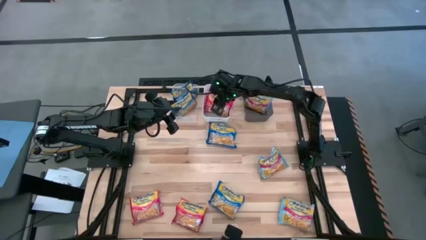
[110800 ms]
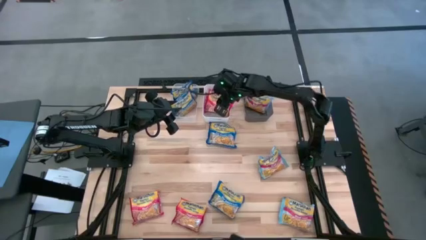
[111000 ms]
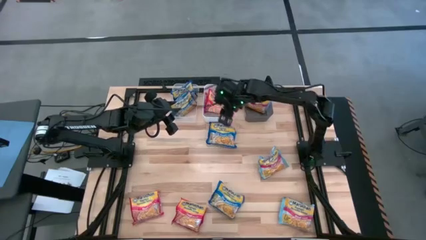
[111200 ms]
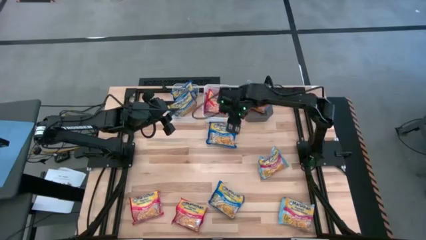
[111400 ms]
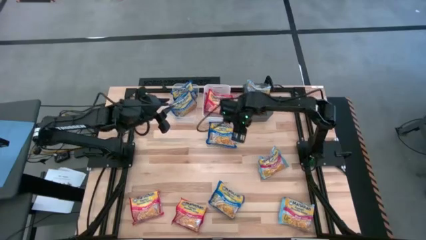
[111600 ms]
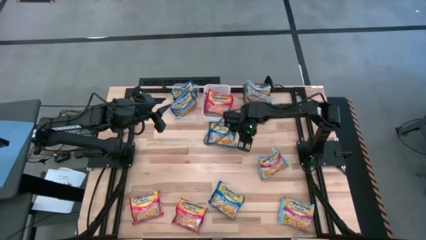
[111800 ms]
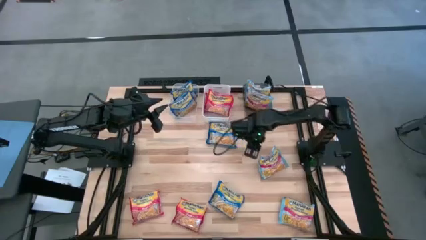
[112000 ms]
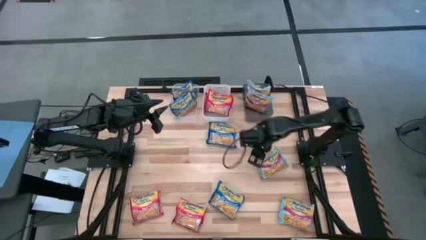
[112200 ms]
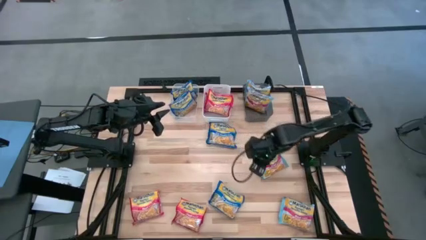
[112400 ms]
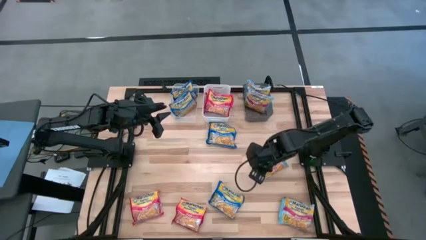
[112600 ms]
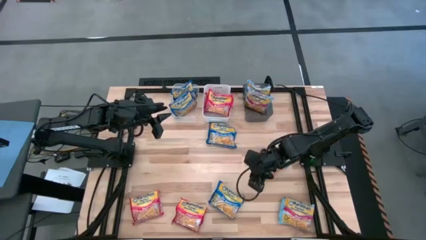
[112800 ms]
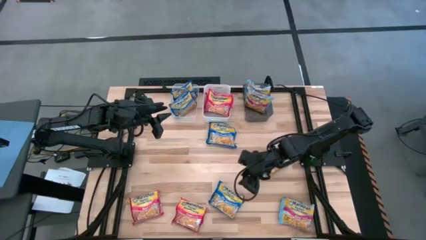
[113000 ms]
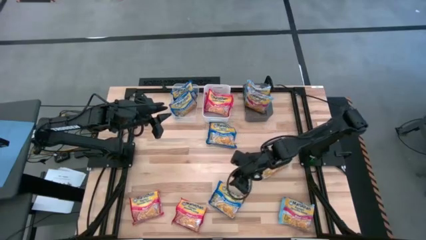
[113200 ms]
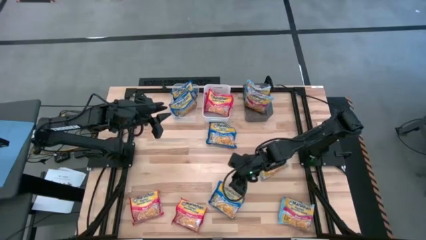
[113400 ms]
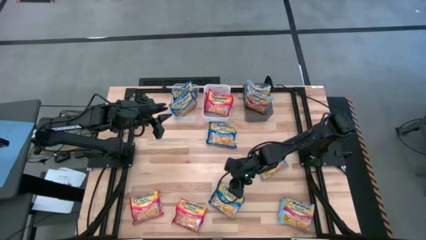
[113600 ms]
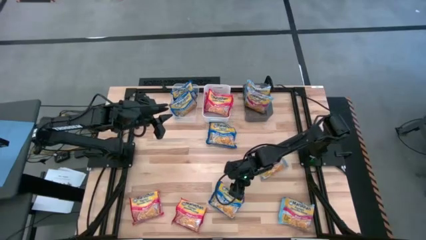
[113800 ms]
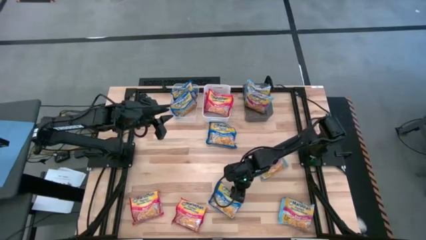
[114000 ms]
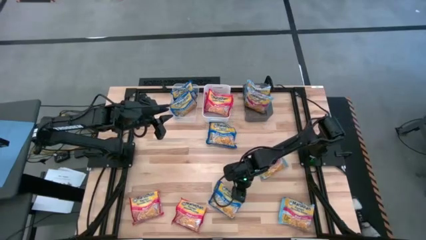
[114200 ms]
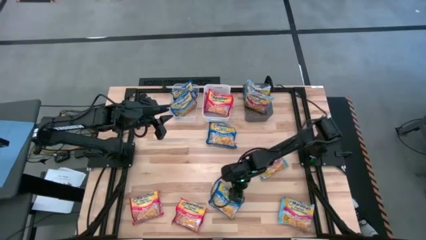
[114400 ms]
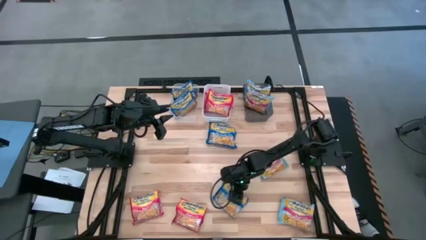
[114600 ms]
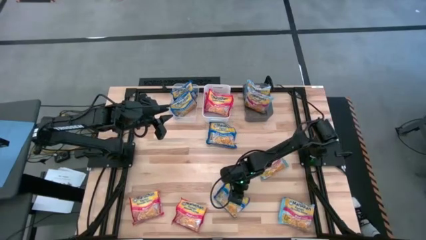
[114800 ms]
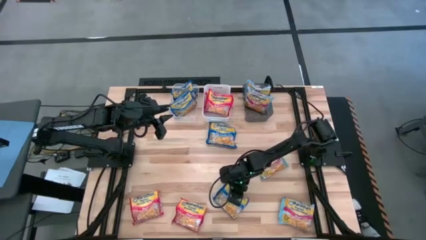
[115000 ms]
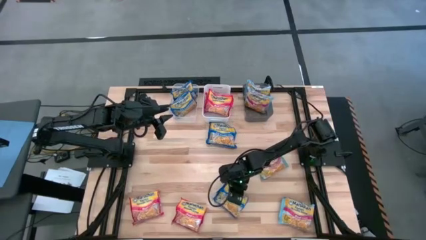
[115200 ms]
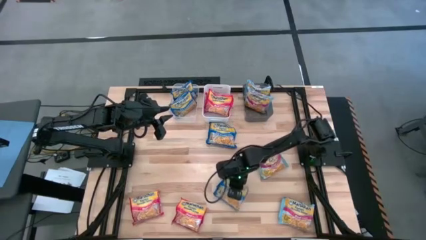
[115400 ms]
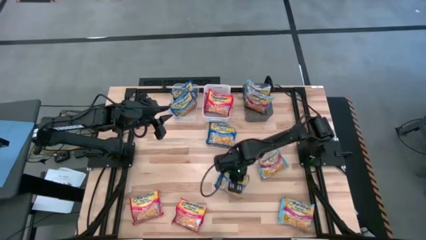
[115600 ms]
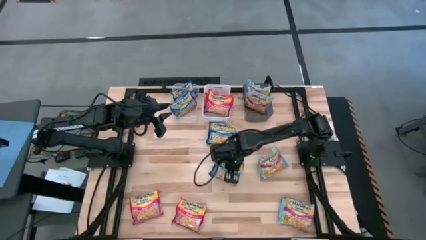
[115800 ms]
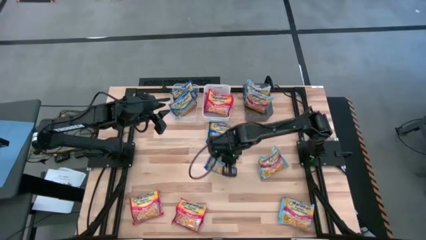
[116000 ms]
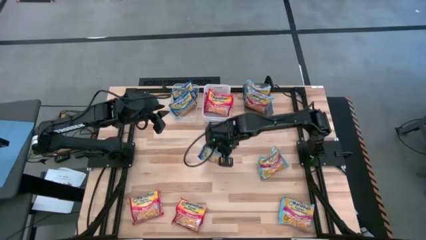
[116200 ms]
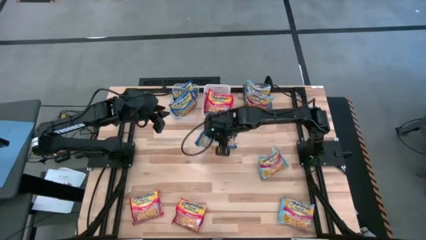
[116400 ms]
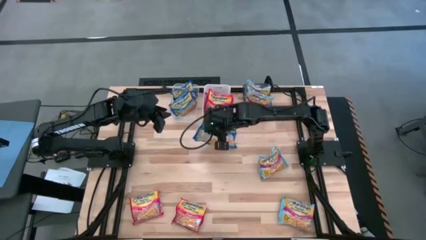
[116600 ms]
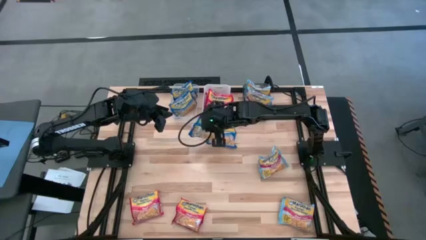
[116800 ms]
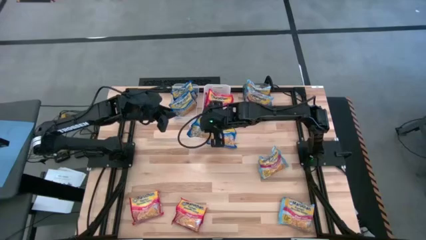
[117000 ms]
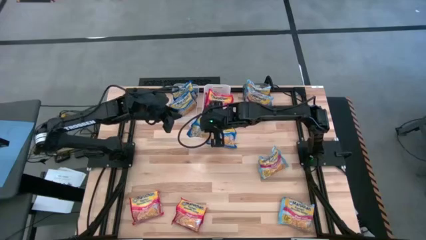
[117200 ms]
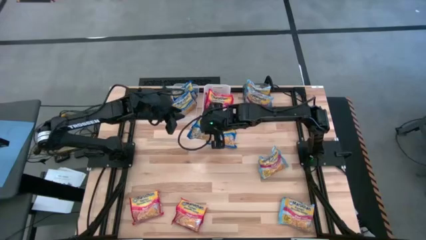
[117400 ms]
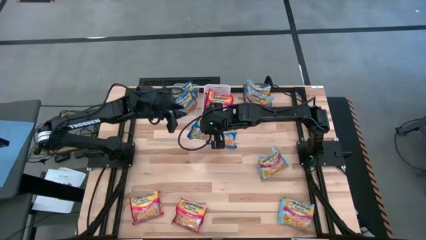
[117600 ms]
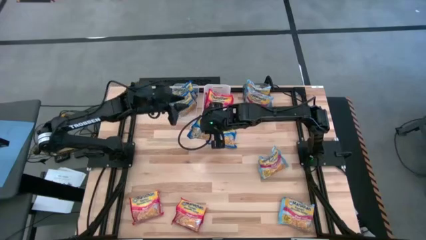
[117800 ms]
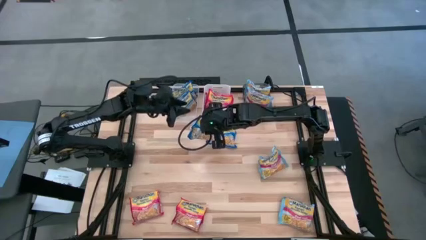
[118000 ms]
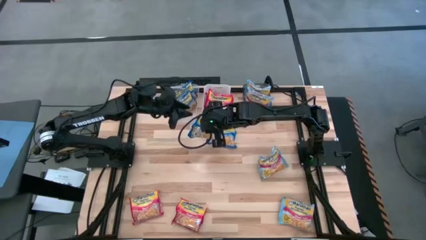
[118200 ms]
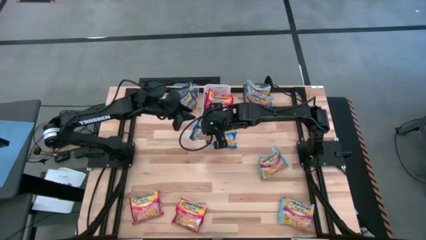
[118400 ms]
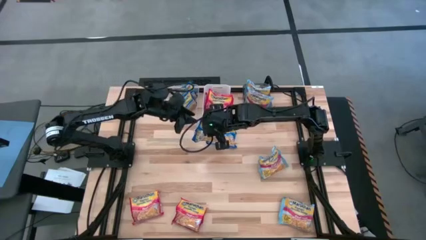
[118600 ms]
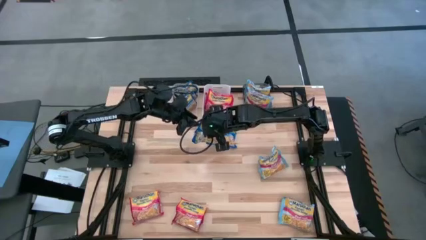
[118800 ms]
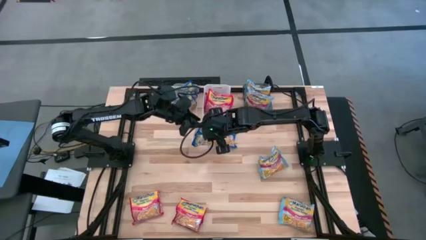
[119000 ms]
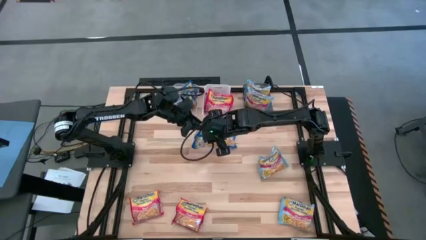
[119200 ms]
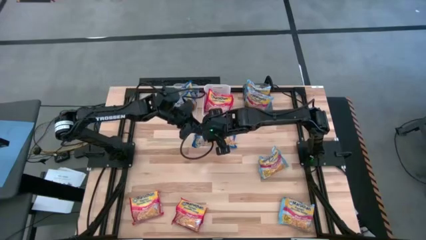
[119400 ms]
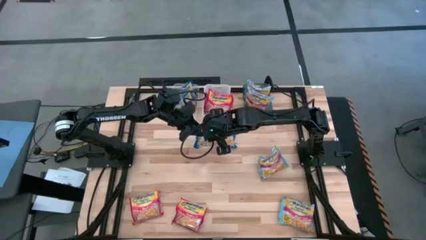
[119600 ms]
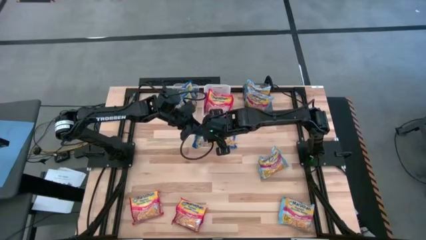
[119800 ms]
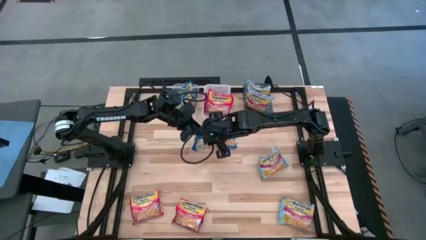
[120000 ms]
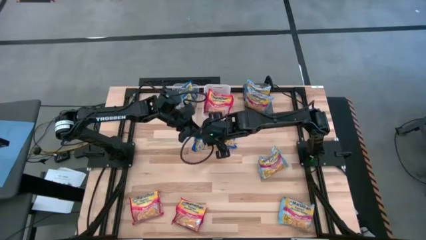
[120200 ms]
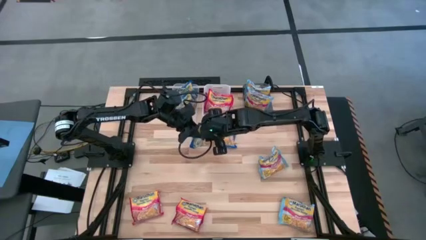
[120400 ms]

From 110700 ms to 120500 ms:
Task: Sort Maruchan noodles
Put the blue noodle pack into the transparent bin

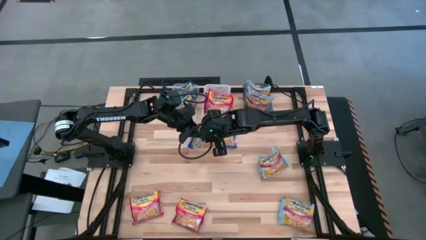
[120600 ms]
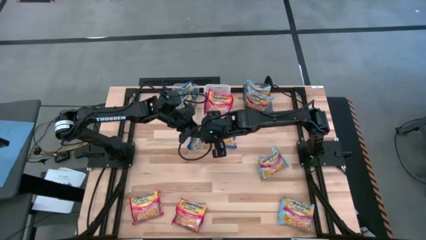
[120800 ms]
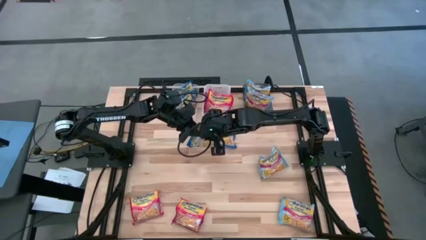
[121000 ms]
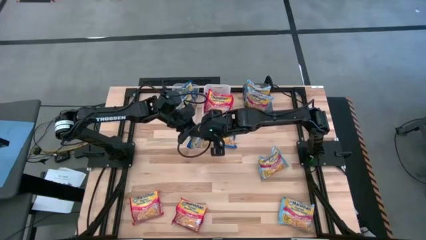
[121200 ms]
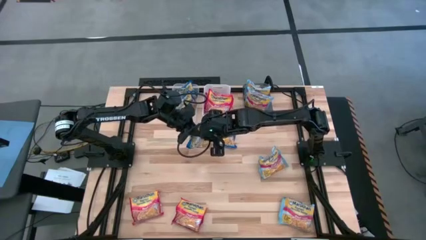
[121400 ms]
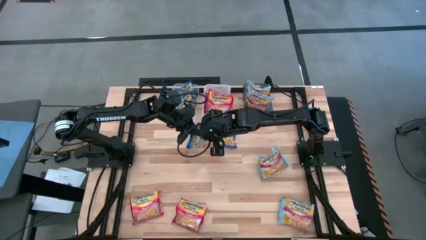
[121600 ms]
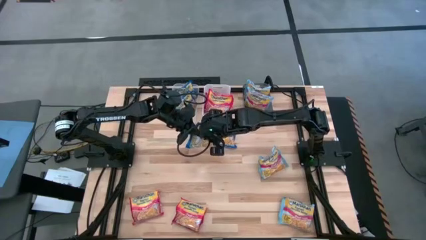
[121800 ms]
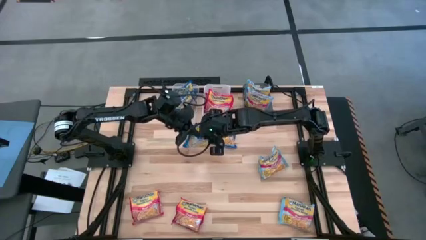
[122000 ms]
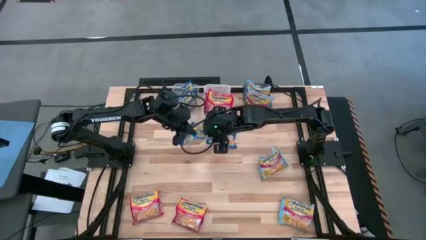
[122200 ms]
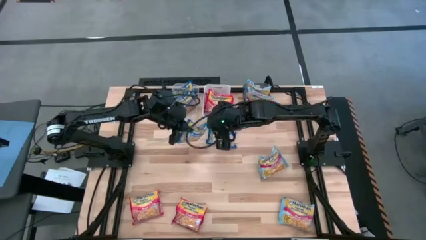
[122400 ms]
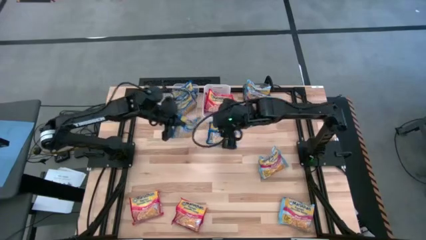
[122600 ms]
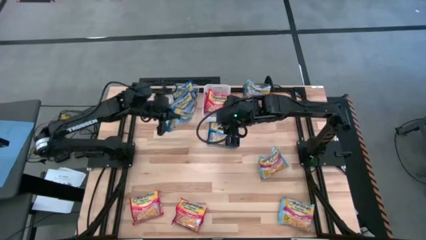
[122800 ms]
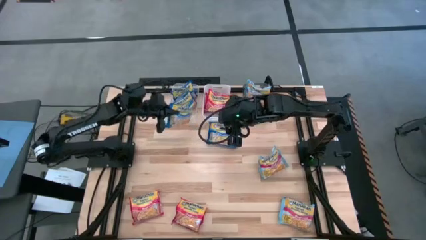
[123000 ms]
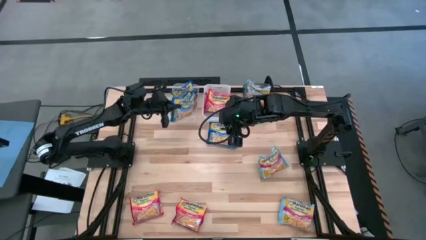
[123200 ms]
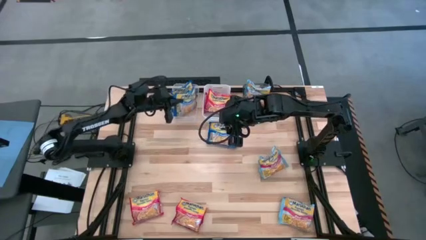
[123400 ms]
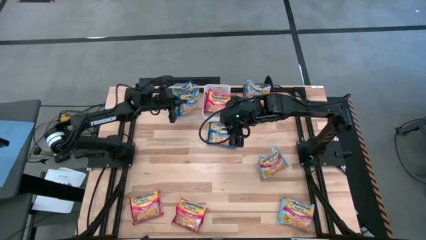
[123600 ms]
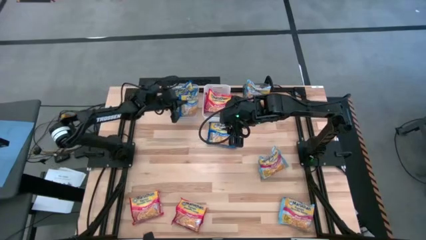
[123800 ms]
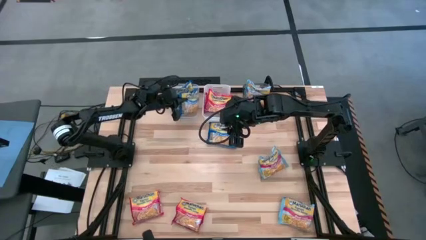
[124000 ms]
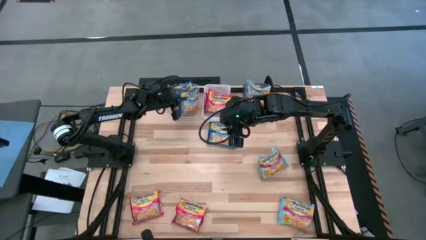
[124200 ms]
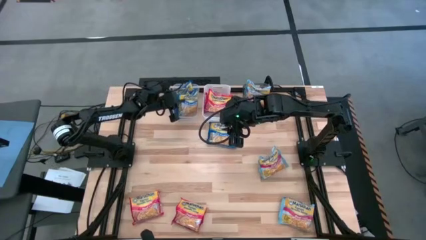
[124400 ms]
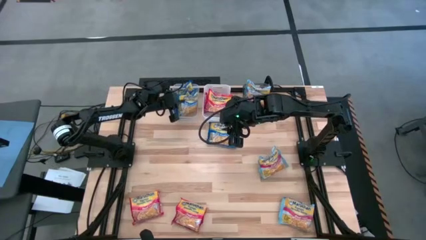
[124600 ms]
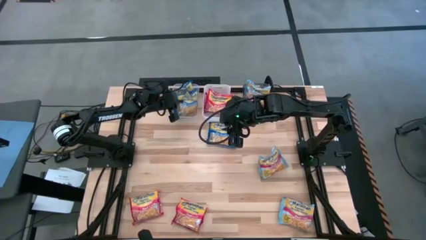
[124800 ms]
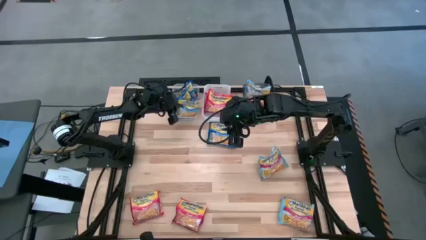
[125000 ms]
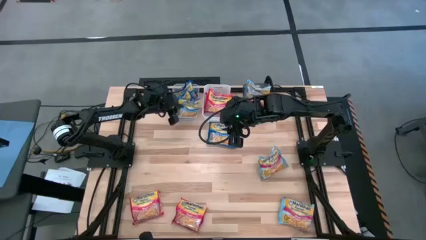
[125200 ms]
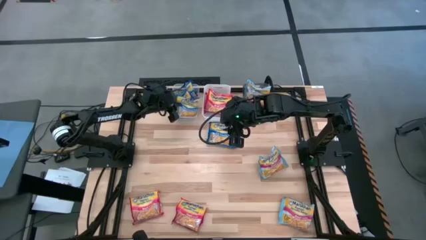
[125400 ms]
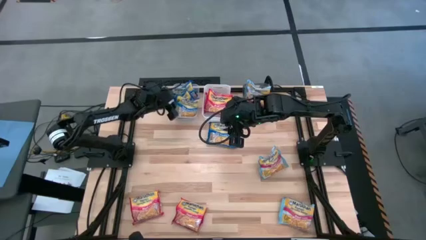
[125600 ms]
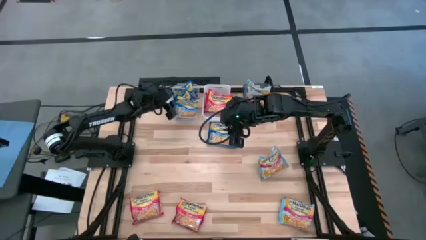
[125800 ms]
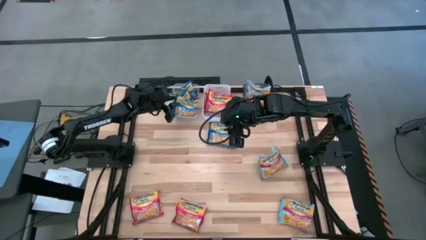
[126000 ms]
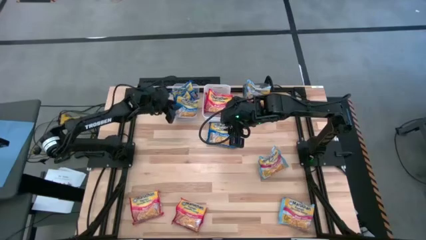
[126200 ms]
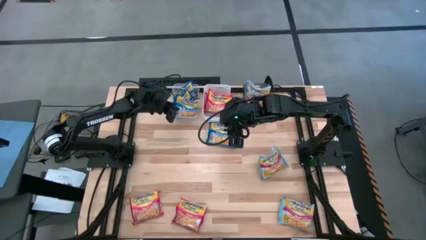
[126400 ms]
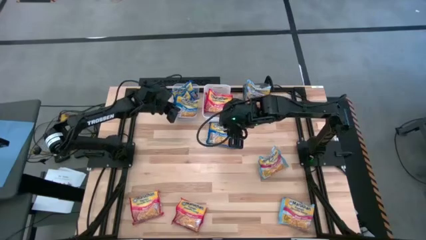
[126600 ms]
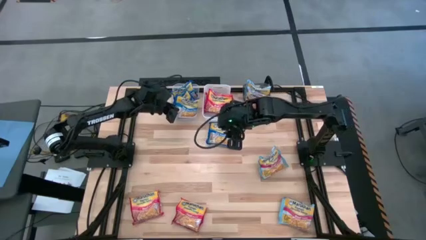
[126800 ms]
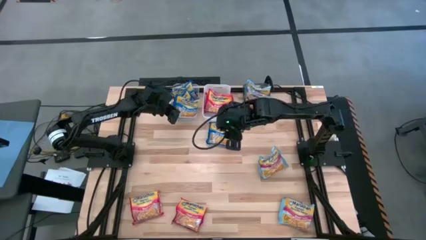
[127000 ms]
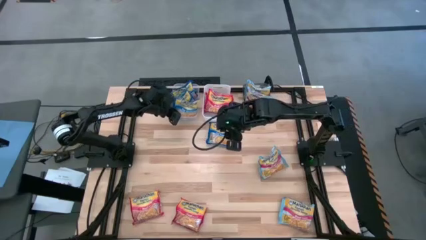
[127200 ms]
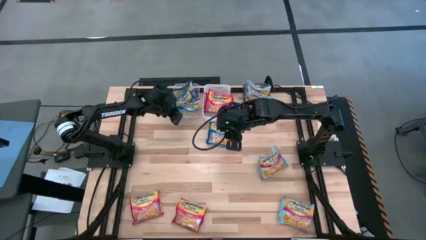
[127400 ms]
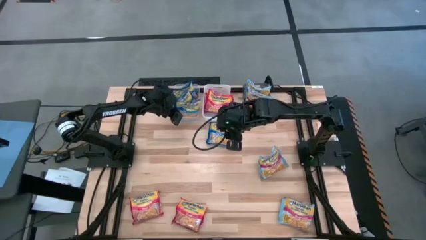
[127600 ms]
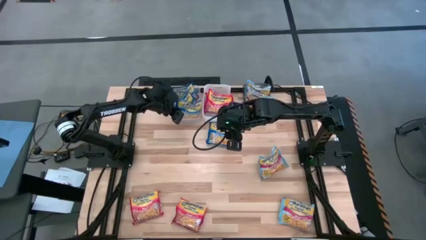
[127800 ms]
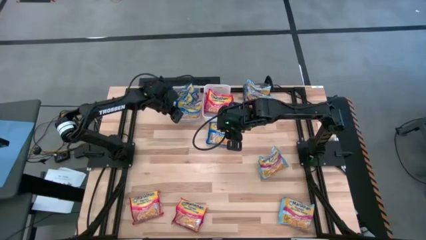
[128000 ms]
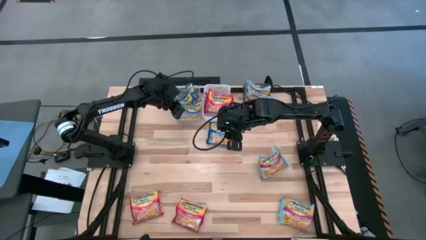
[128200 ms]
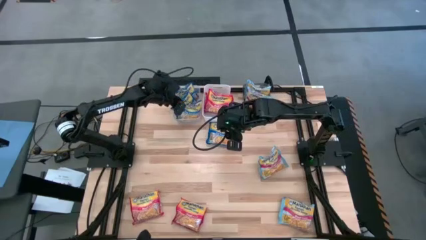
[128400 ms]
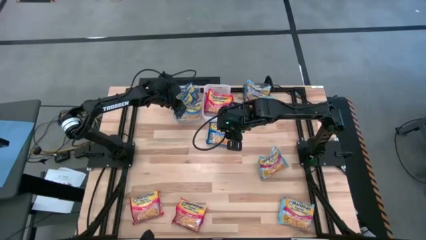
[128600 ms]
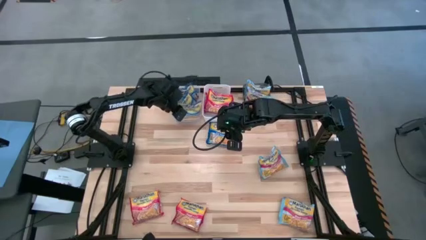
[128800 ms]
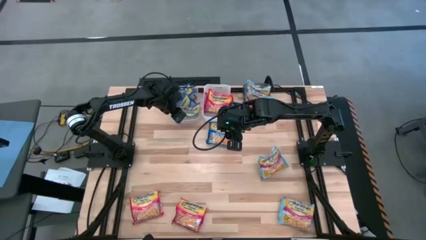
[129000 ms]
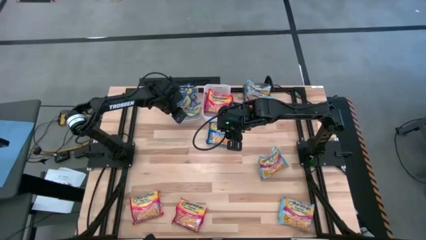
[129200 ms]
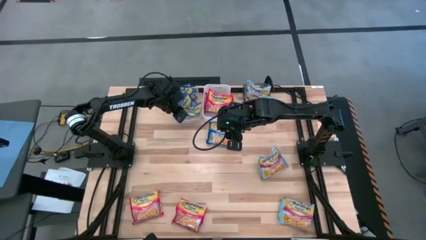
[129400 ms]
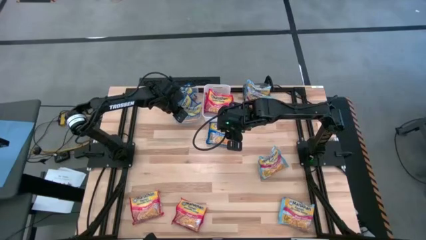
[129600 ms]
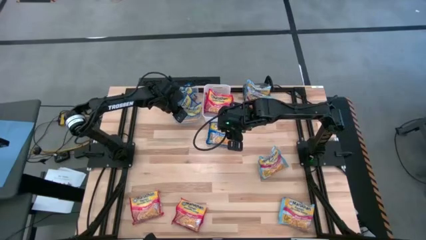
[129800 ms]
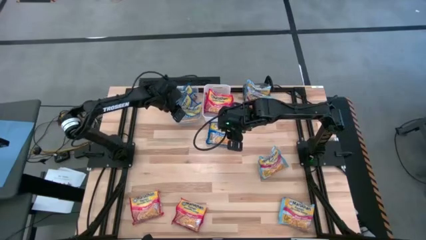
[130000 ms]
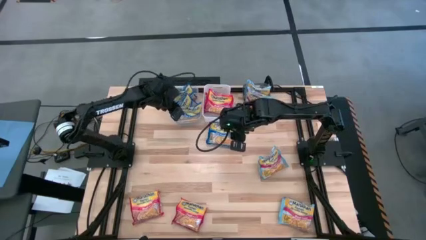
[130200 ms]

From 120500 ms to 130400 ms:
Put the blue noodle pack into the transparent bin
